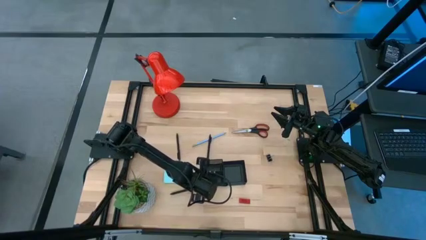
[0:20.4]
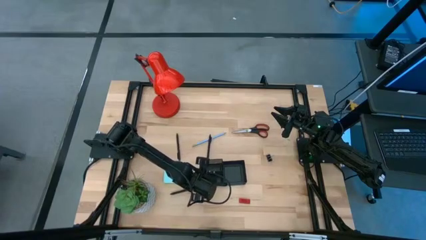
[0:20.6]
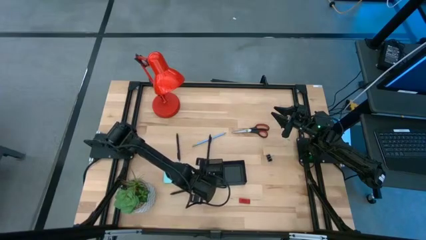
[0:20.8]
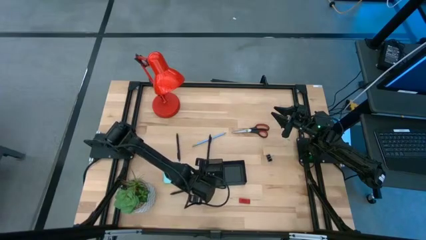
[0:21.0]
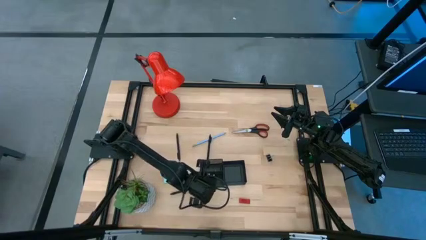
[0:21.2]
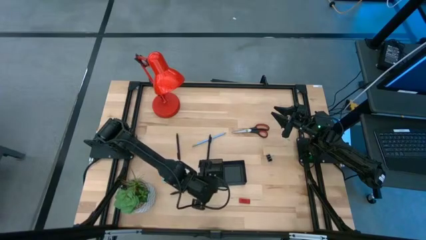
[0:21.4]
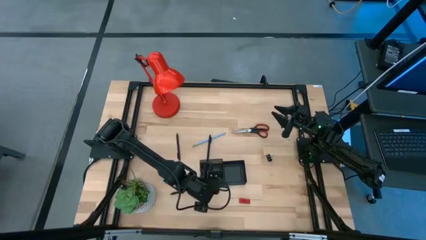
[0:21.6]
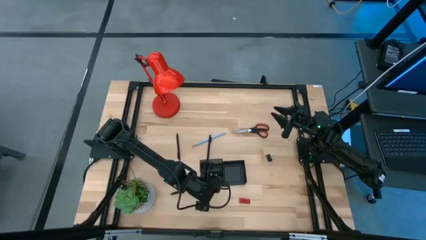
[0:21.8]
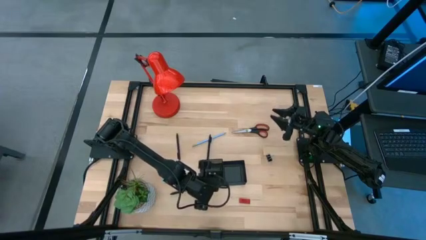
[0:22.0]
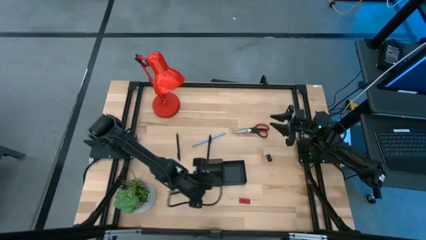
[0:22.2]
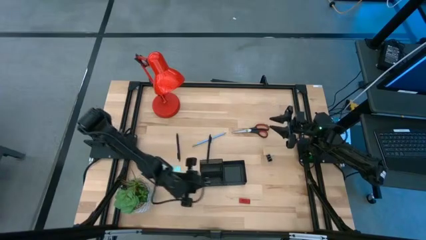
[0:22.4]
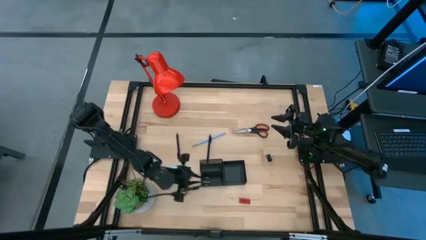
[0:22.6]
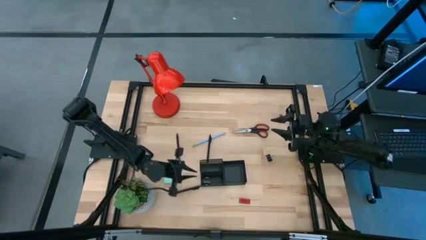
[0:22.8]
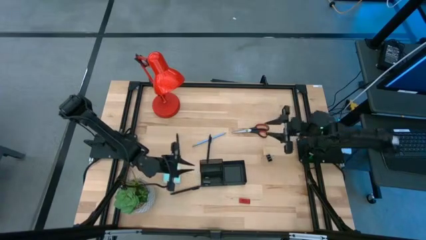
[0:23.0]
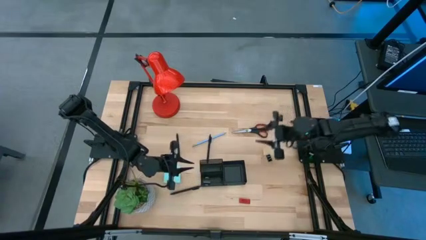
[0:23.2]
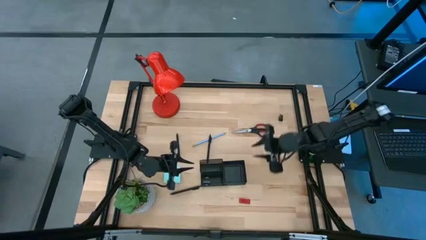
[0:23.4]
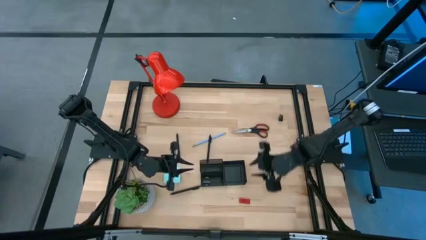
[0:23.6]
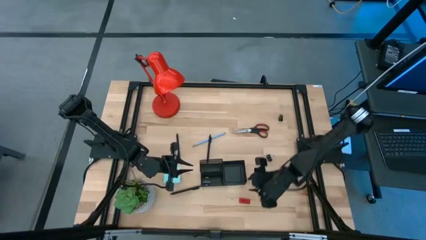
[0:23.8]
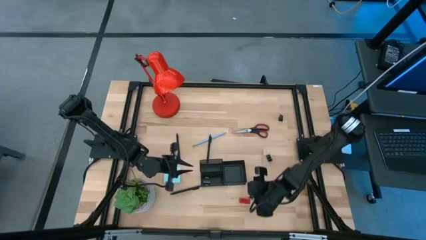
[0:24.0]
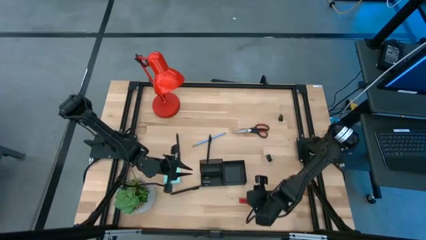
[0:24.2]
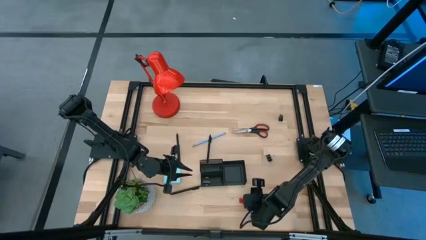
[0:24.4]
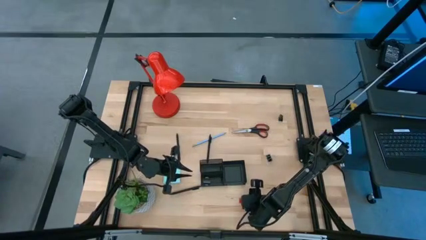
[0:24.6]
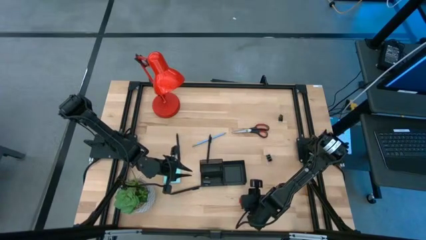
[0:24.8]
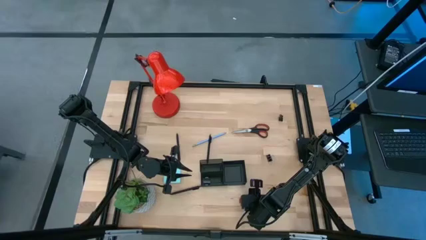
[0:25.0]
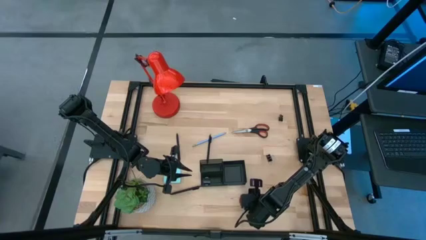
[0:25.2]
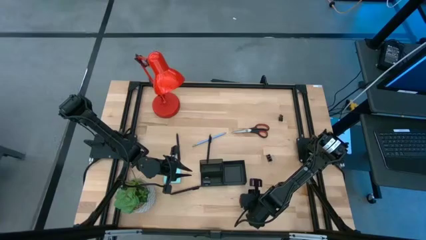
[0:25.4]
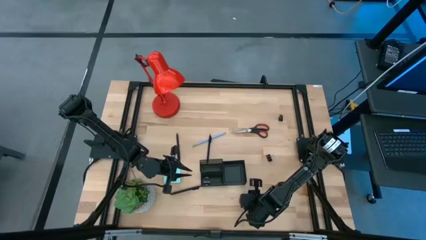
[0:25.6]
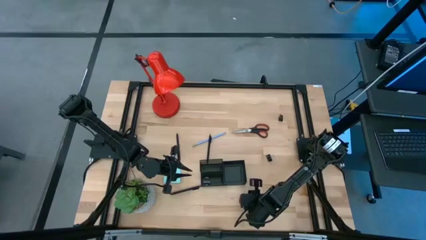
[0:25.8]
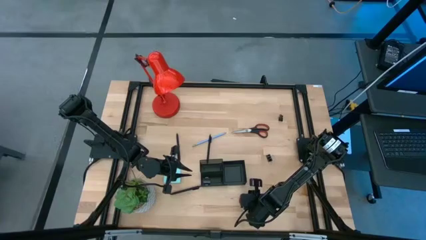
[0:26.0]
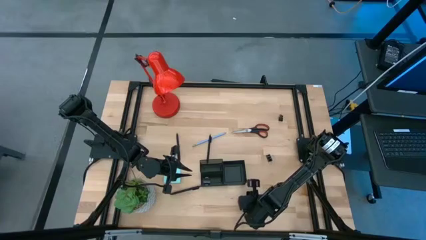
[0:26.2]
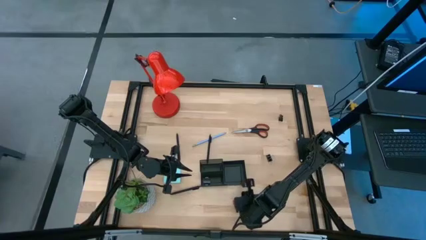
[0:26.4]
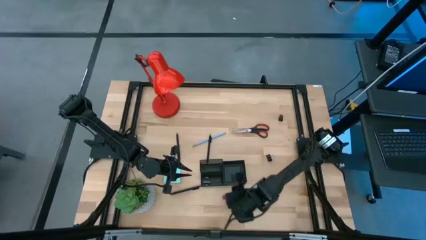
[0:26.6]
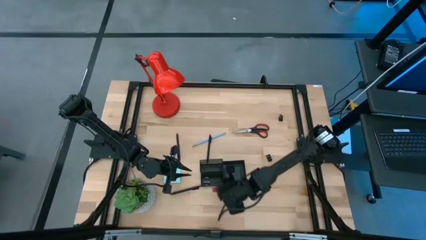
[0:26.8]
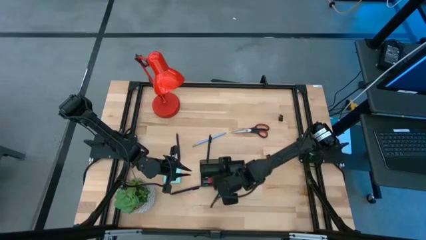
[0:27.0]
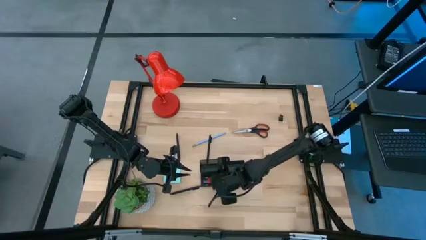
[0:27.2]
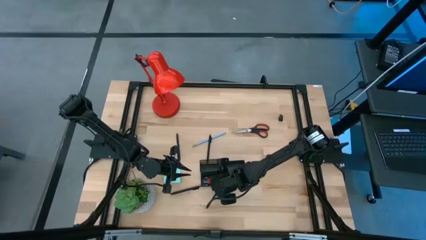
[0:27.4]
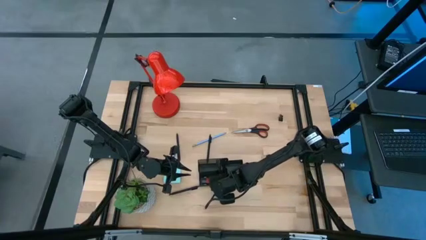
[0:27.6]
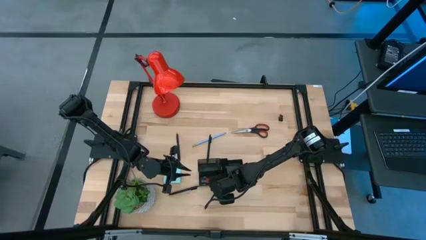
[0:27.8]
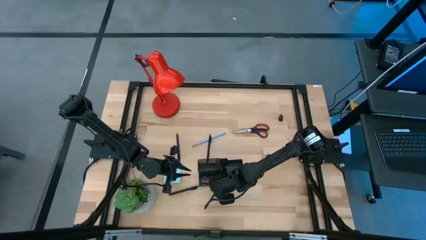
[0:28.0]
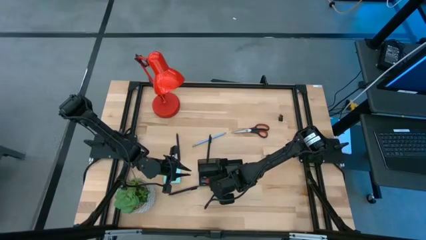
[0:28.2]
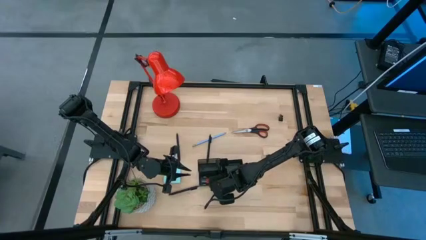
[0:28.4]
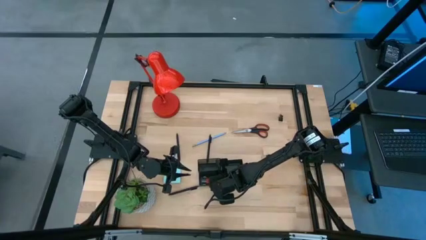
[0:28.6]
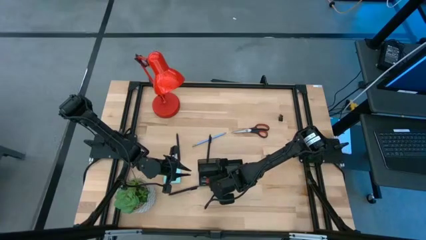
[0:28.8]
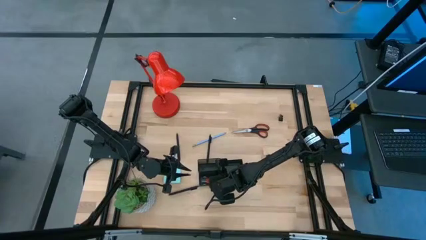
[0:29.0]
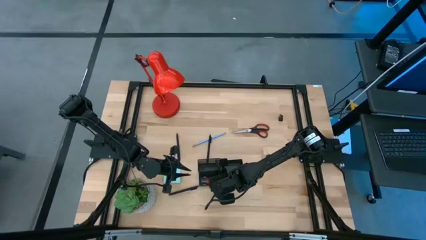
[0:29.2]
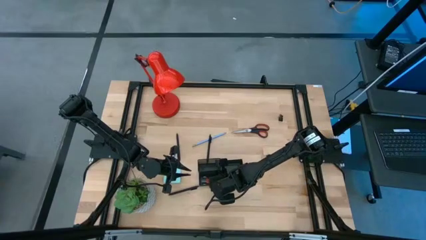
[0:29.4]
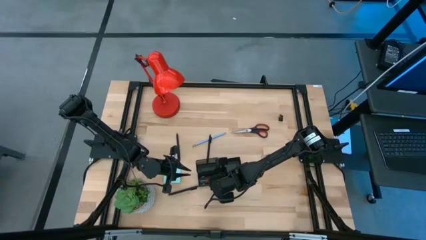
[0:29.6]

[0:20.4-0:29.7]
Task: Pick and place office supplies into organizer
Put the red eraser into the black desk organizer

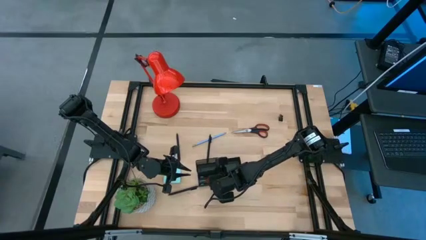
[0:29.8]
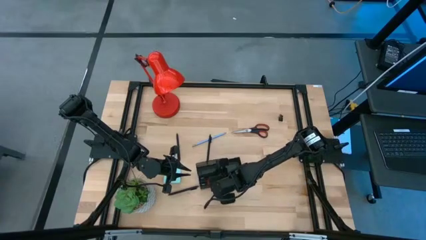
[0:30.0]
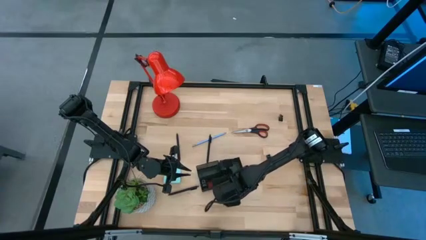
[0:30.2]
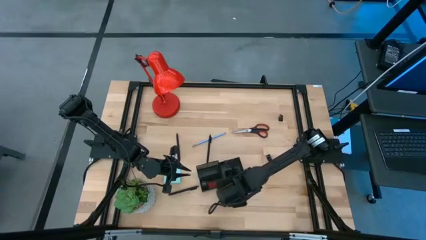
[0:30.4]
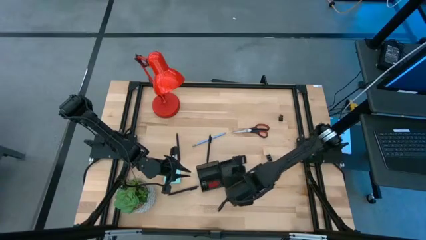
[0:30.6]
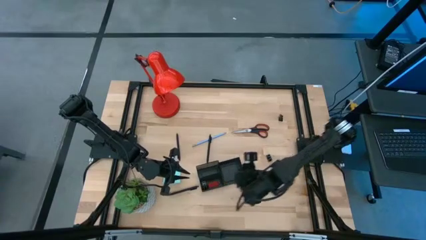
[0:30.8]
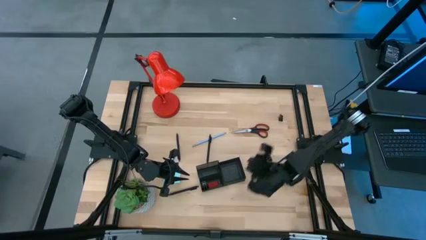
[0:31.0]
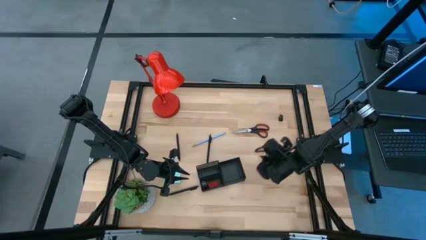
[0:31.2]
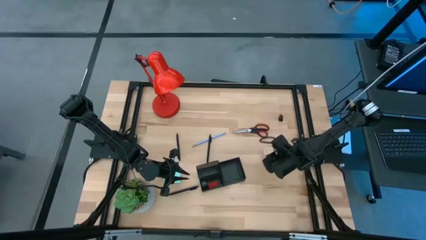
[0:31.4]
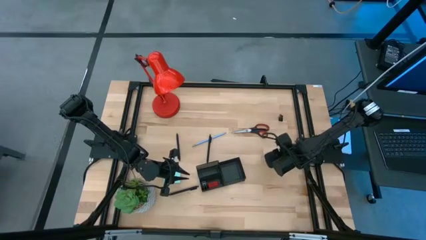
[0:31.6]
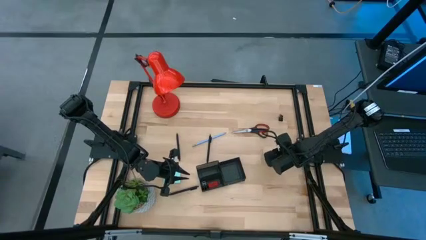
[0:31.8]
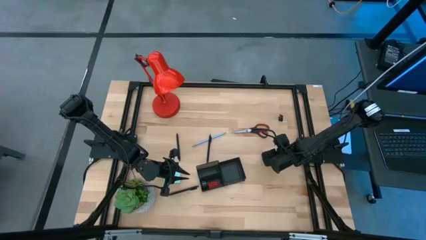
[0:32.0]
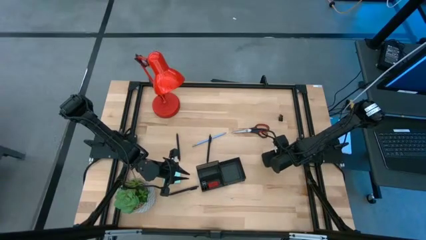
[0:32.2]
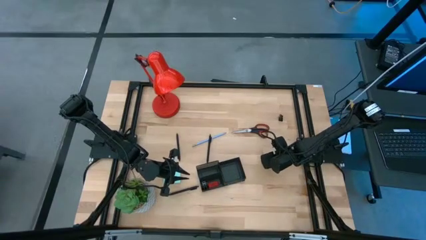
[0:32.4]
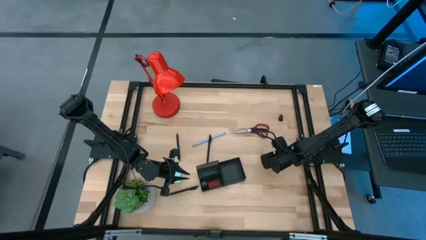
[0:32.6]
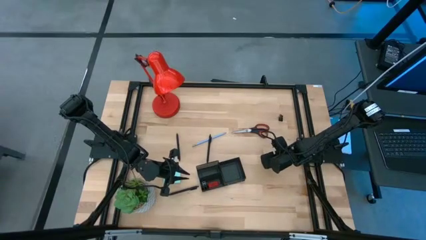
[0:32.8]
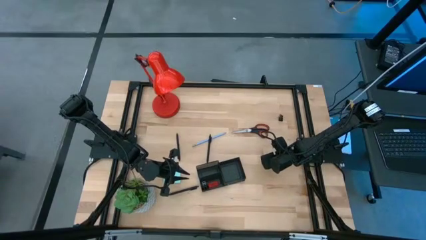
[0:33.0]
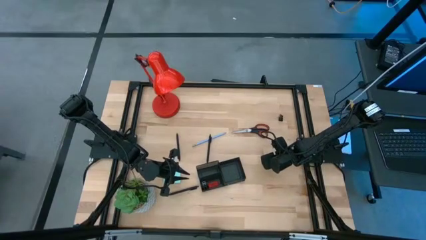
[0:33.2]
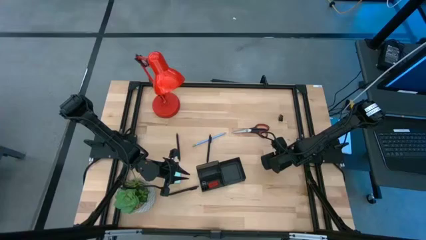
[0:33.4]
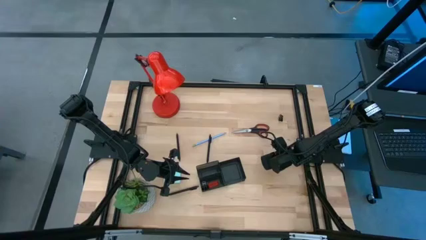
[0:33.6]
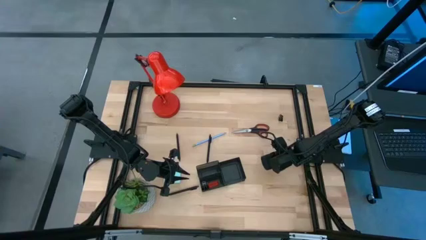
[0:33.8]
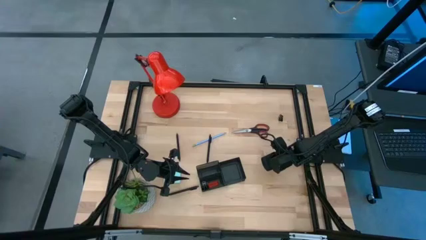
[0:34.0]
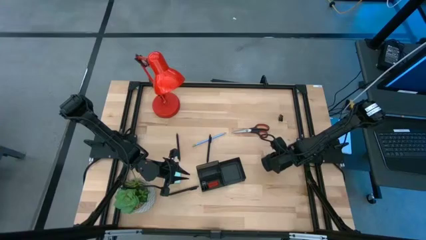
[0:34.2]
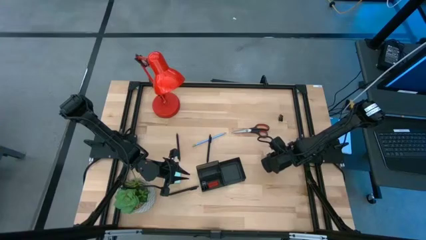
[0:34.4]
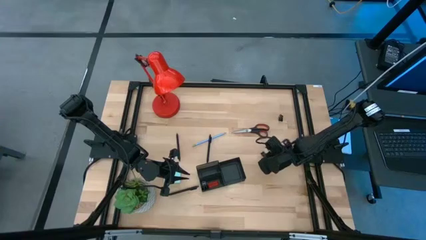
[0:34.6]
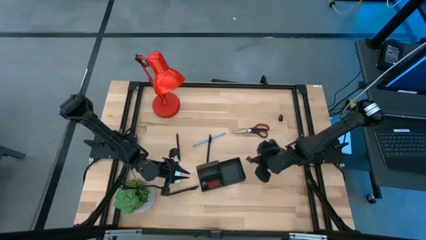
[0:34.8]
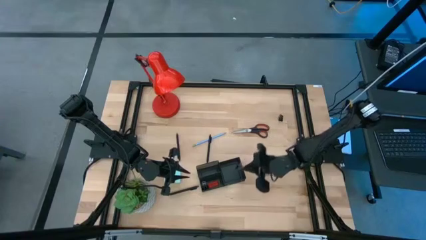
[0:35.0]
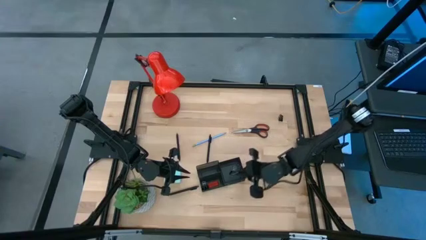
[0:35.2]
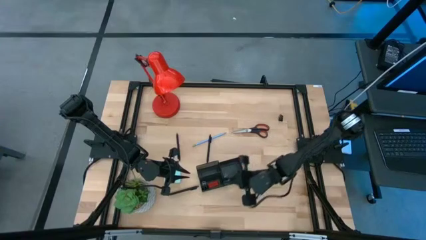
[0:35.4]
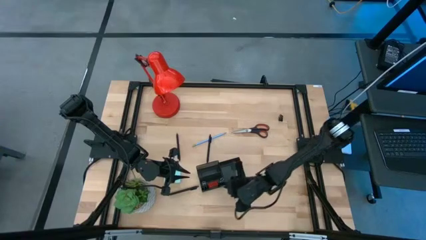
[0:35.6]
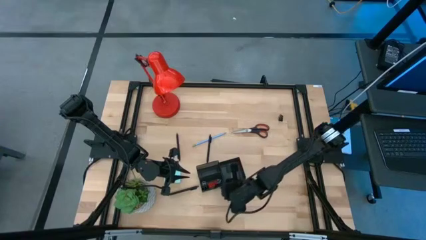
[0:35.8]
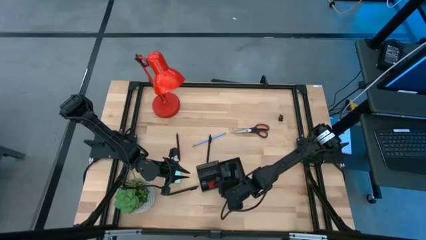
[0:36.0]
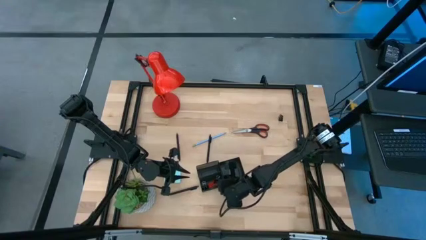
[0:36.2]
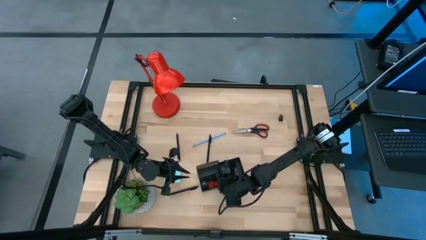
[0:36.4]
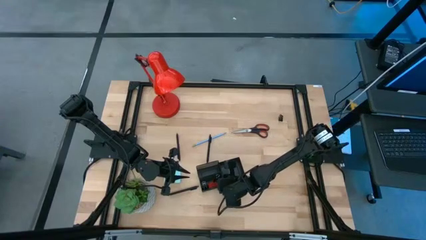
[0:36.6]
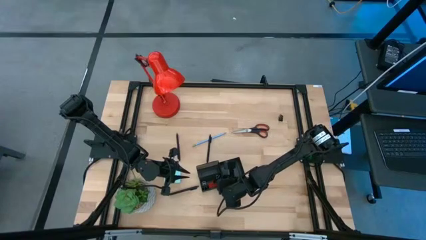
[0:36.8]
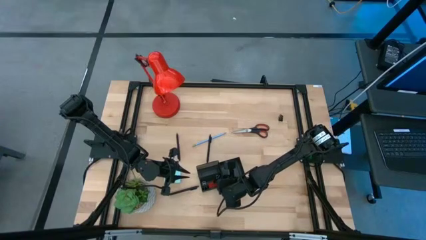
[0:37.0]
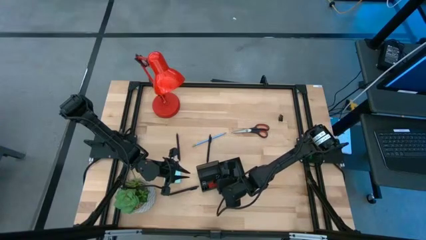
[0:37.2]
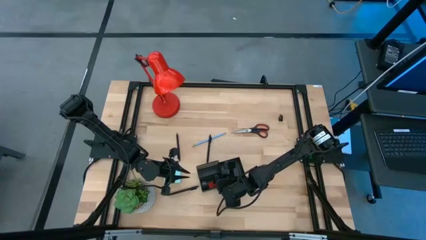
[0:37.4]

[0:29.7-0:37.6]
Put the bottom black binder clip into the black desk organizer
